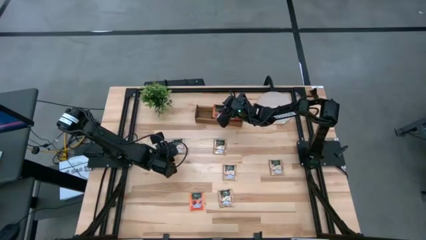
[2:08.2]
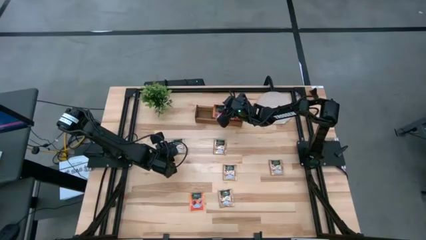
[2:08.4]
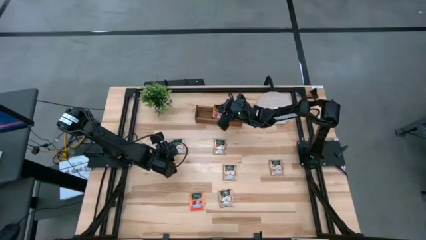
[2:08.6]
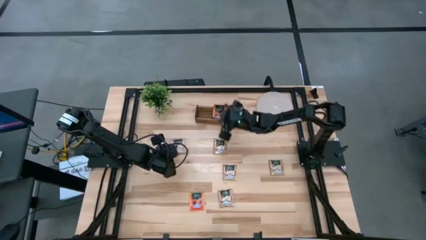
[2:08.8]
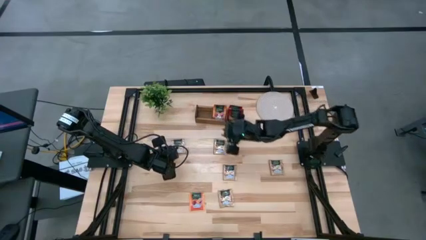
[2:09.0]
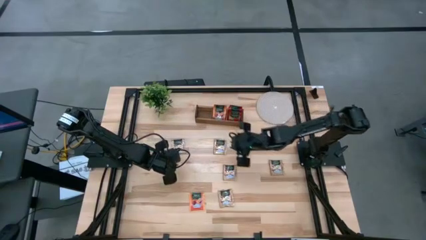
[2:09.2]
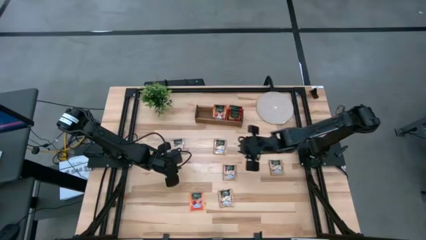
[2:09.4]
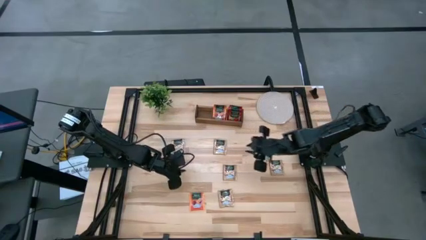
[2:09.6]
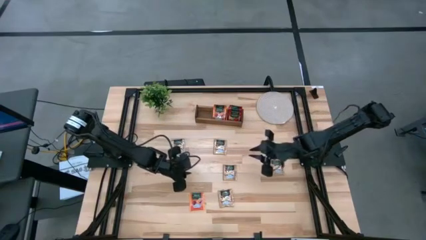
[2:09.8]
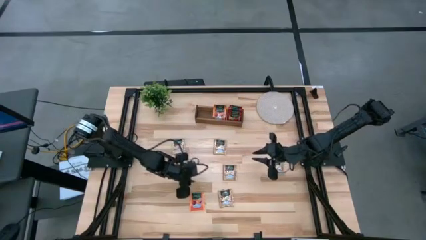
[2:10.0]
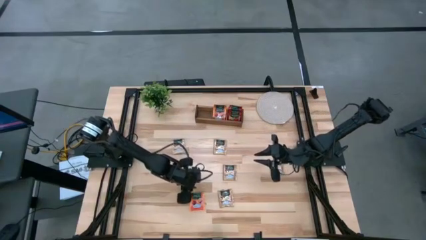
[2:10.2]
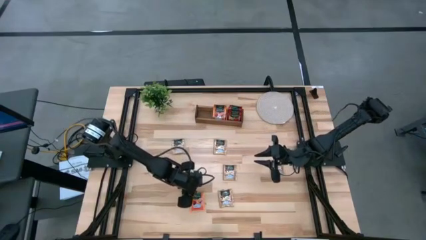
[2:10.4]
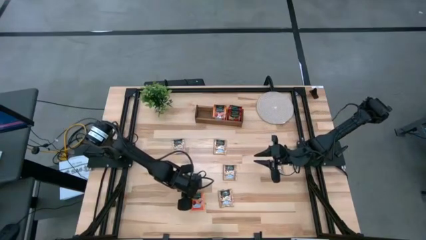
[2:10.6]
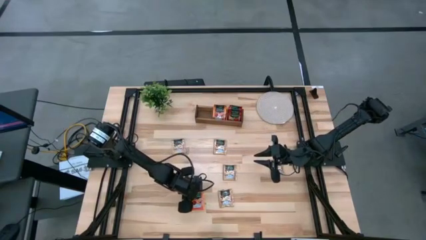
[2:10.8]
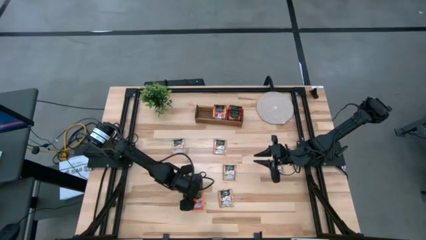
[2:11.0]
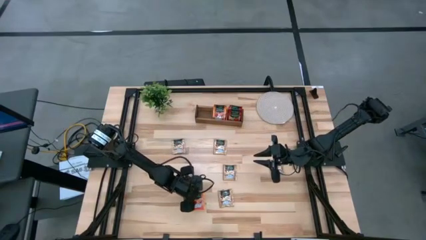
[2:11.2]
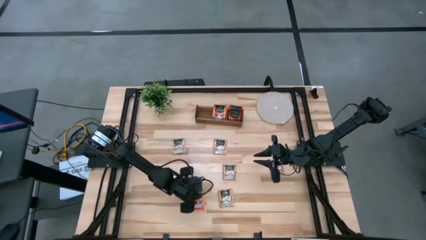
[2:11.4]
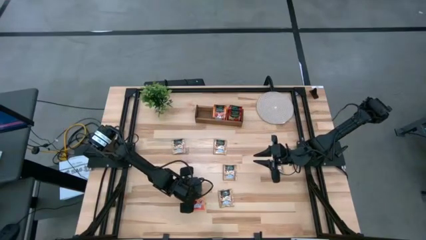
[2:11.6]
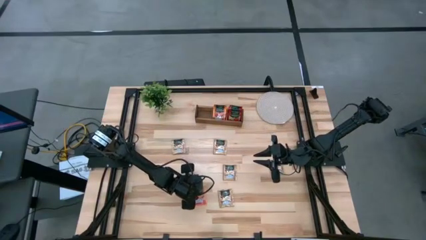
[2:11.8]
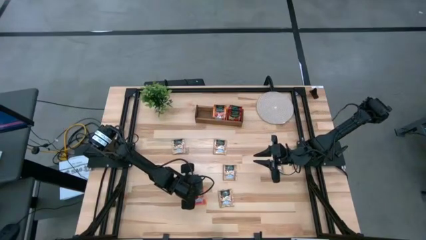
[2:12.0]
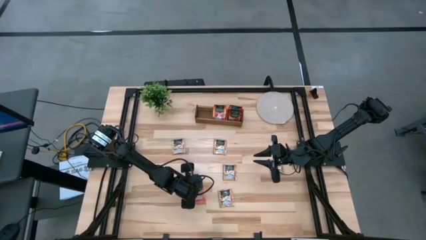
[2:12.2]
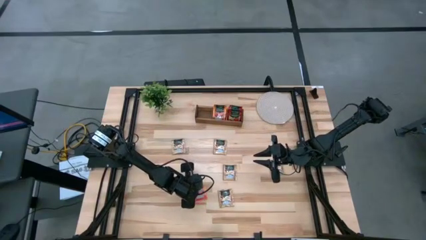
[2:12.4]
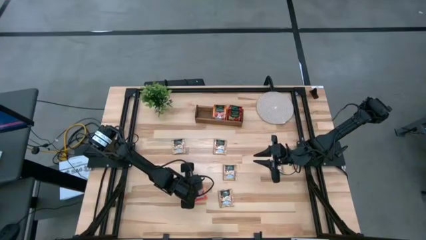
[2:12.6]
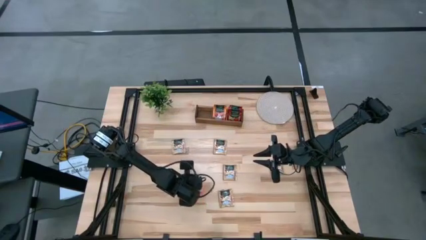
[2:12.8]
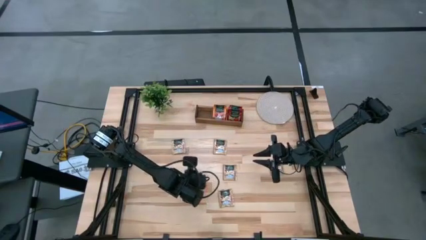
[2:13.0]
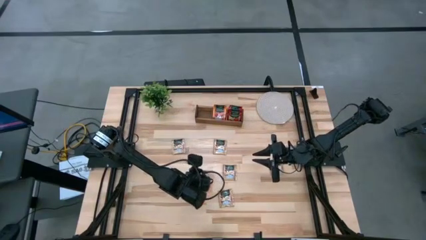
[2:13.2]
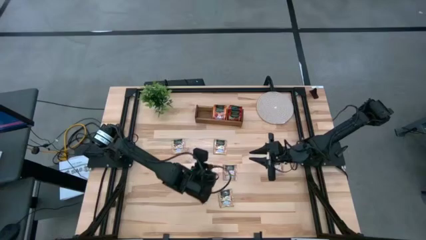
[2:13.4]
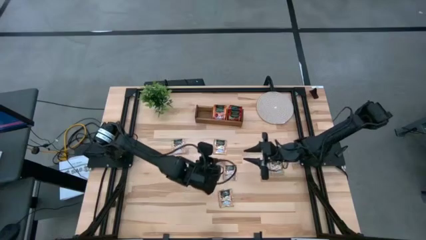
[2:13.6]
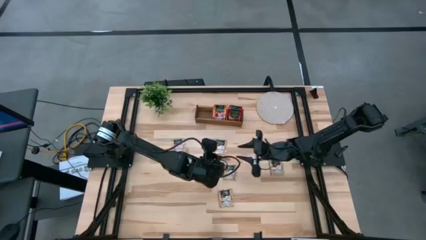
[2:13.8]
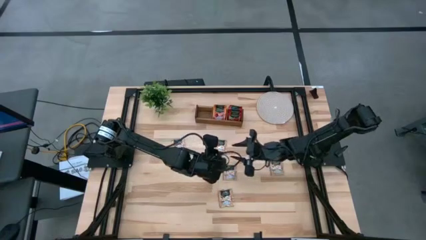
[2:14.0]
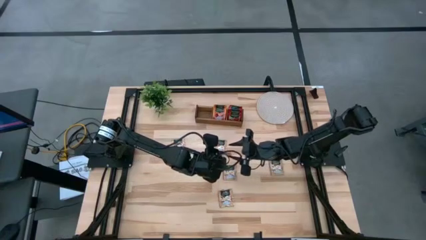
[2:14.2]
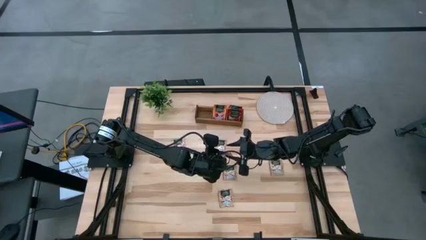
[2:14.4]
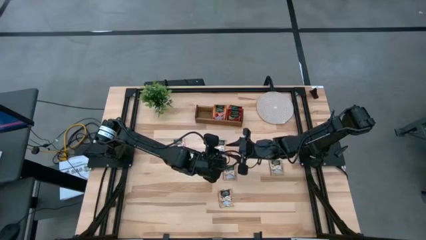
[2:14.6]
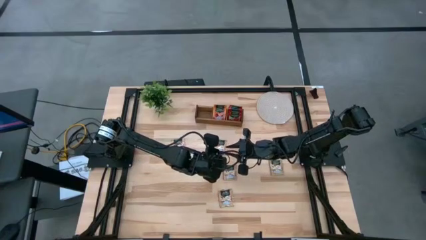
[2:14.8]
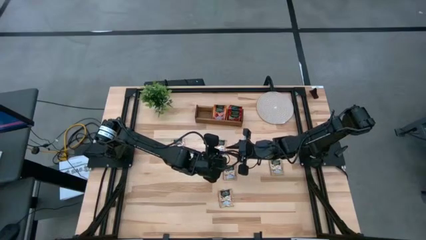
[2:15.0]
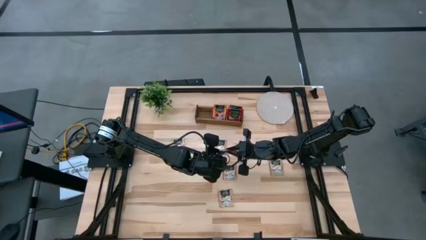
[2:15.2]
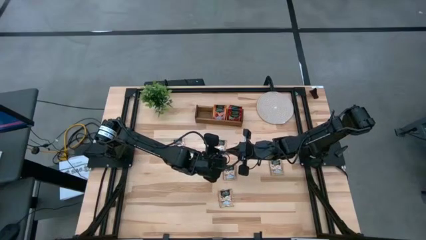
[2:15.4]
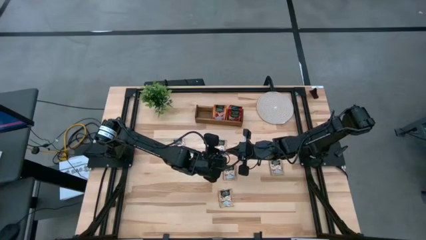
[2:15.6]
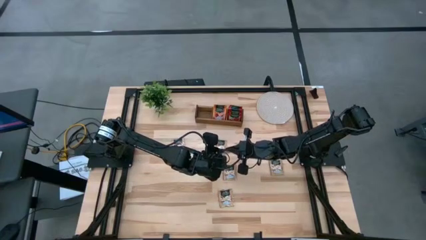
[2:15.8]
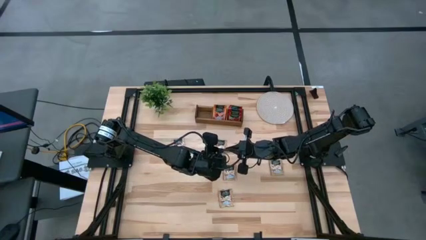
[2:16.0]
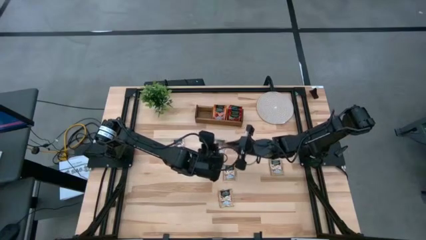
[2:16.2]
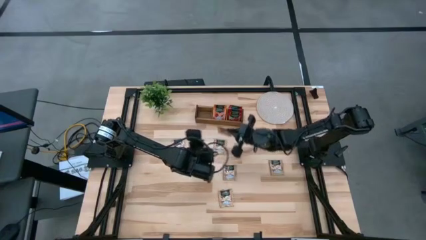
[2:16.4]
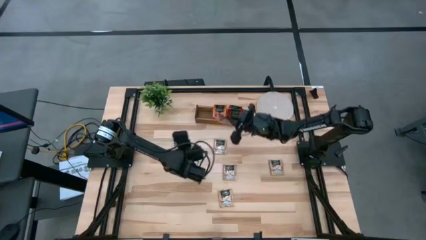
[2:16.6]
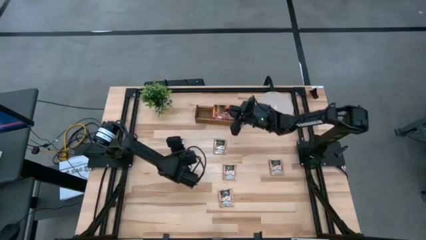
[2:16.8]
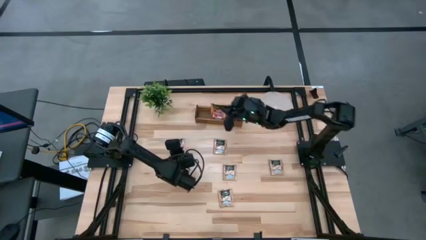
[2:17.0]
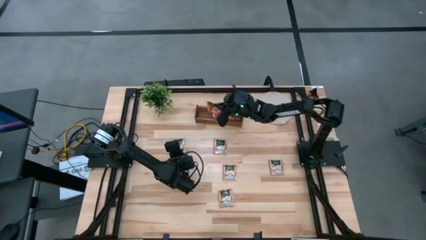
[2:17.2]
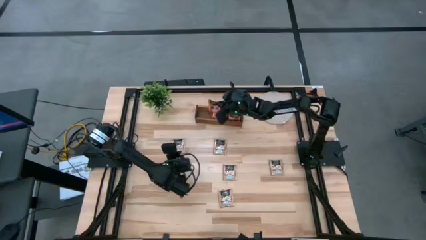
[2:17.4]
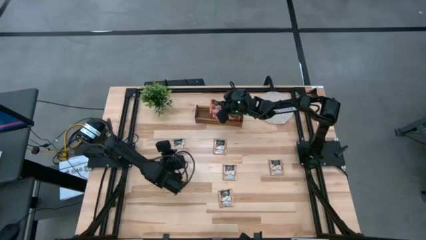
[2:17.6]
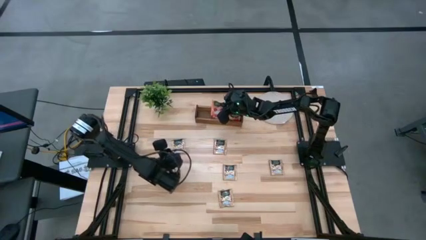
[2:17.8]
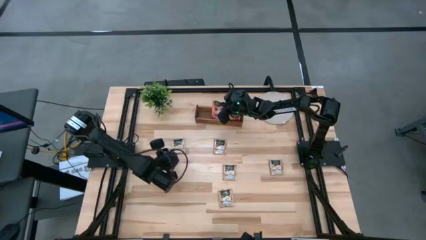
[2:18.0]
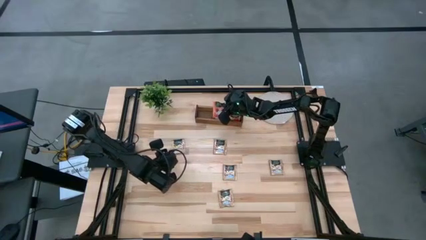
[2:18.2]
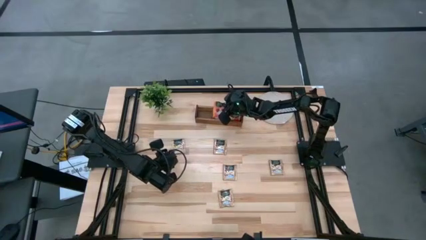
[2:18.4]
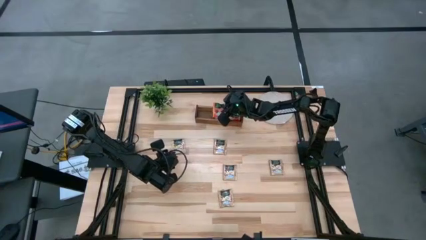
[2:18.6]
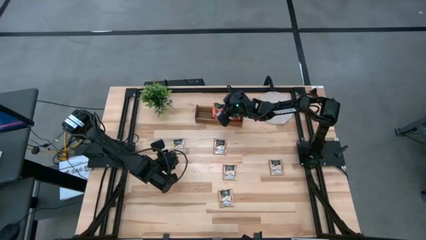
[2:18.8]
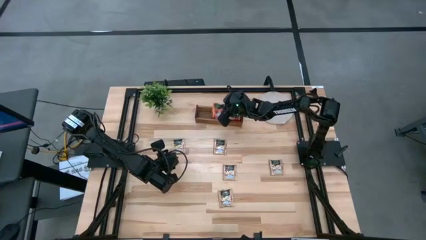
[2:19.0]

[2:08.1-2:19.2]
Task: Pick & Place Tea
Put the orange tea bag into the middle section of the wooden organizer

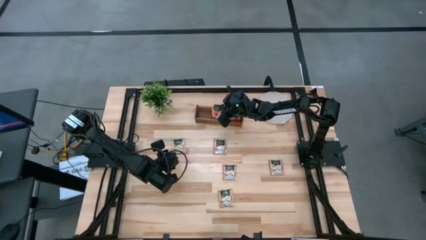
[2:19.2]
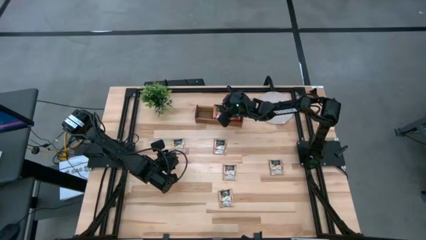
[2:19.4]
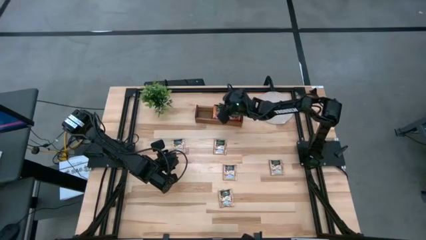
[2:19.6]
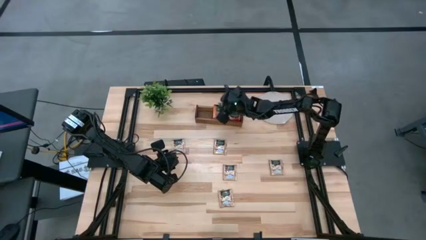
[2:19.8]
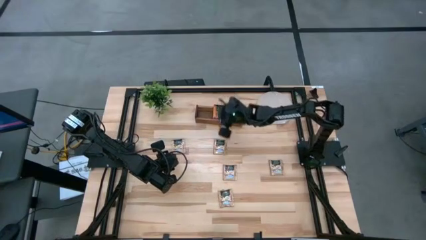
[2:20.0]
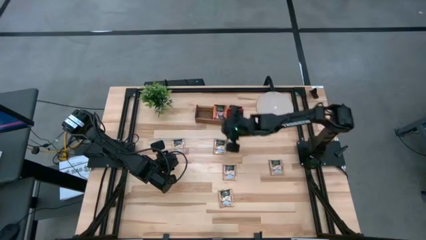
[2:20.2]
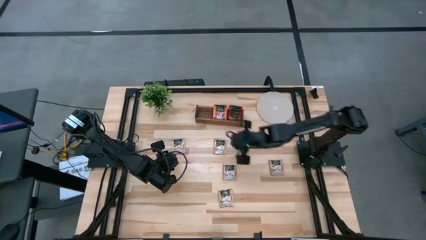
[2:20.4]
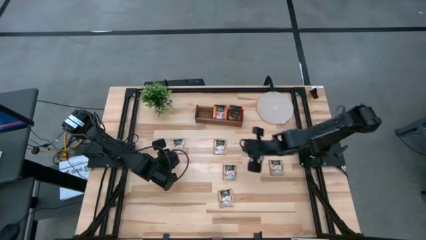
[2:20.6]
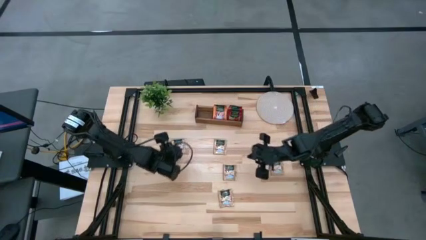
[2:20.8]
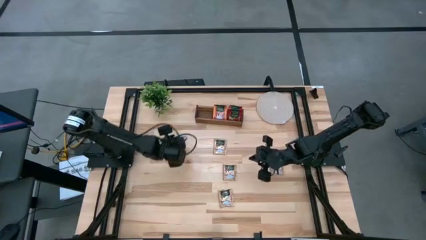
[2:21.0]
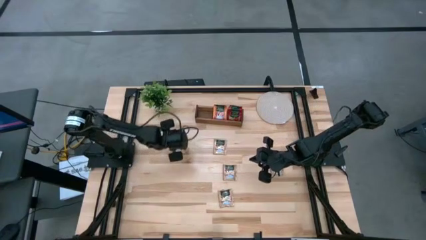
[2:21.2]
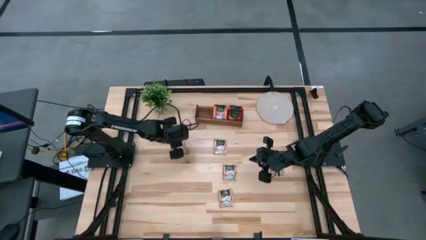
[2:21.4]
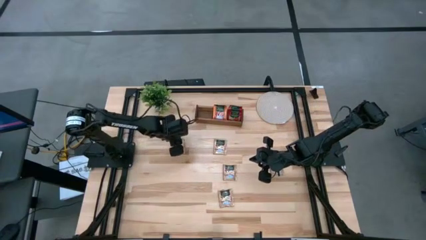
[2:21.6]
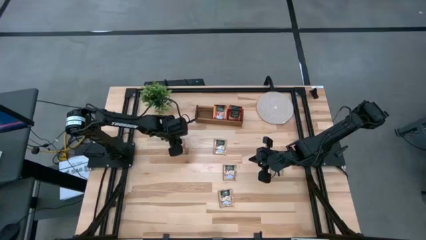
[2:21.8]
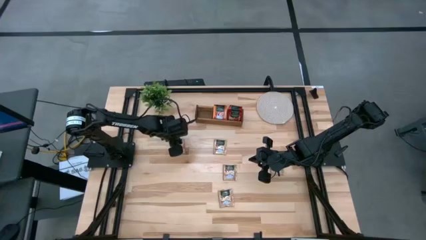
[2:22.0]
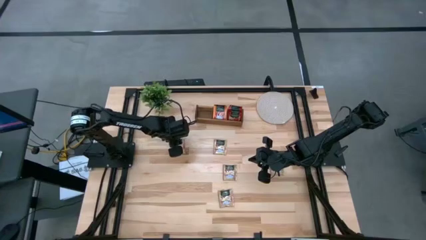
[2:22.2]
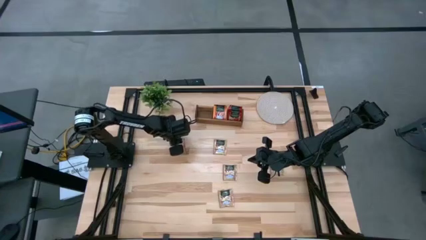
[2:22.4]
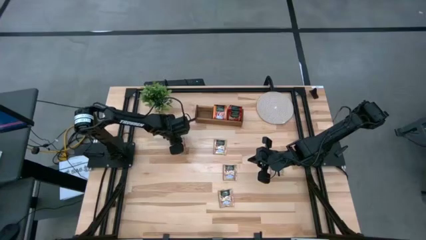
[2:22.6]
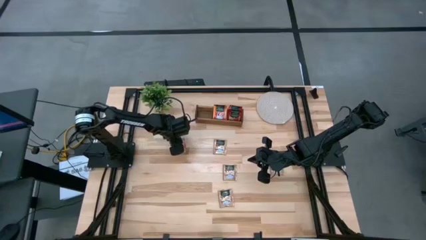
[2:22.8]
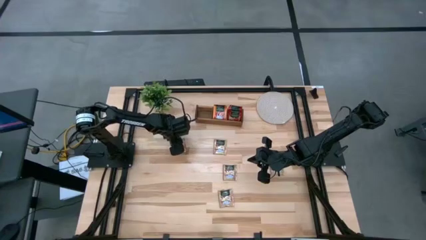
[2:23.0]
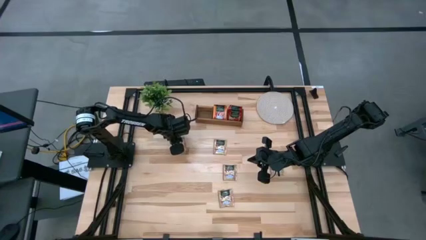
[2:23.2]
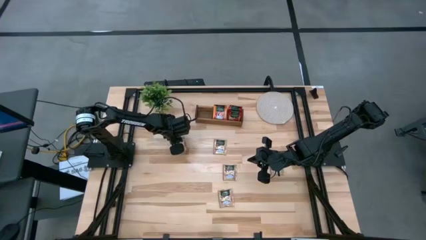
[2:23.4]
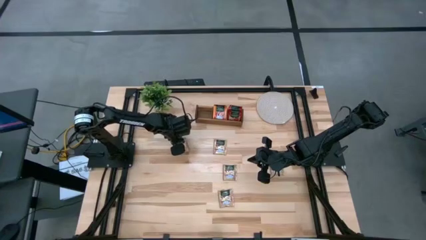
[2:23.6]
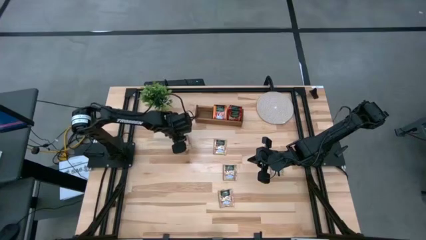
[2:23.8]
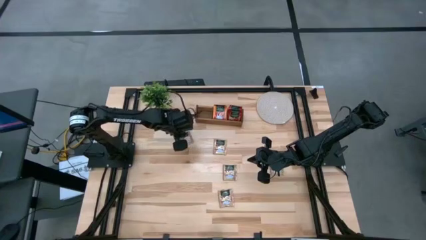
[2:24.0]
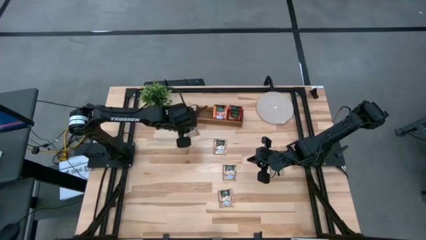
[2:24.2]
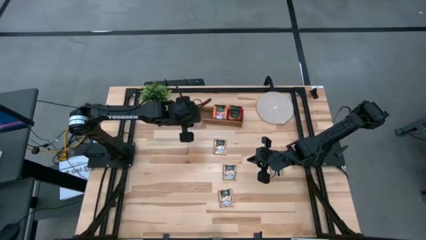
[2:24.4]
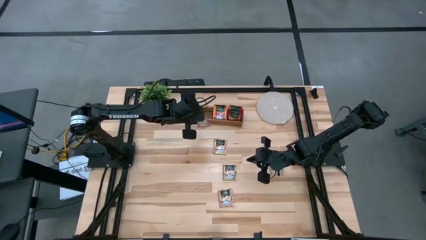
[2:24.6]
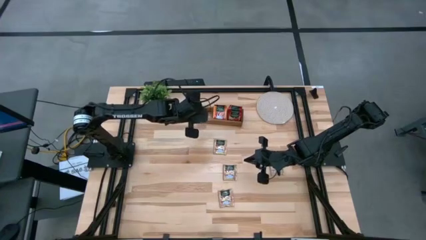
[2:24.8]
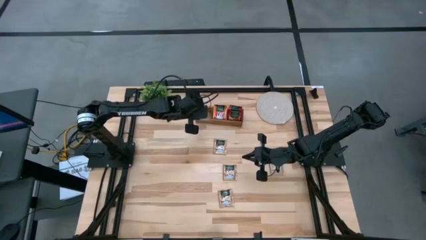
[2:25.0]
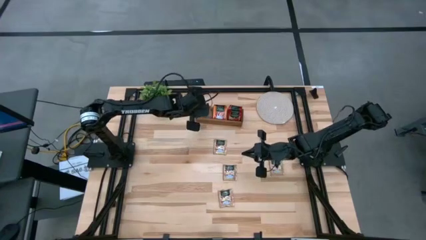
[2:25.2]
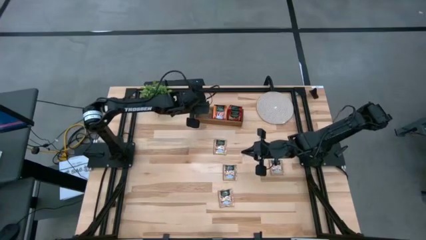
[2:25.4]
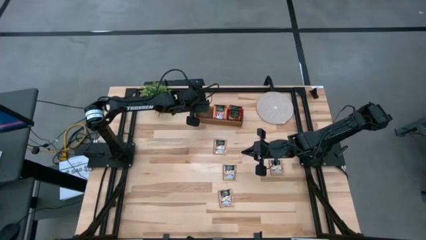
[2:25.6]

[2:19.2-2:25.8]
Put the brown tea bag into the left section of the wooden organizer
